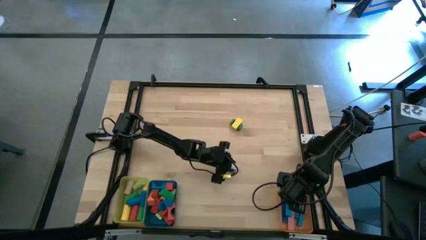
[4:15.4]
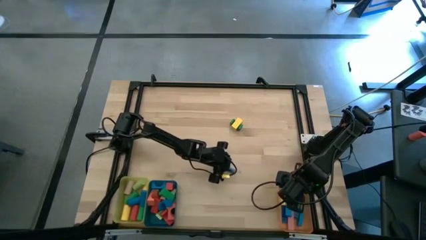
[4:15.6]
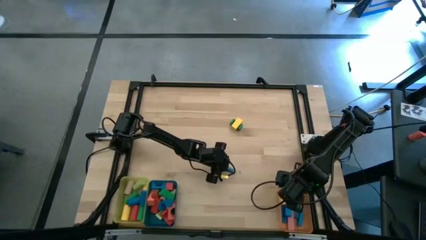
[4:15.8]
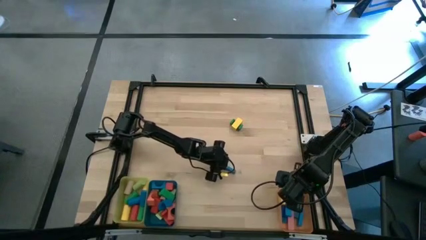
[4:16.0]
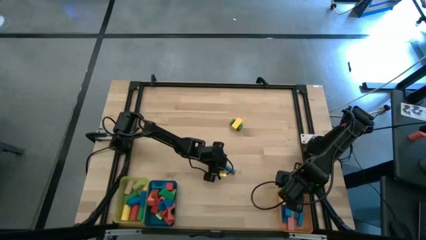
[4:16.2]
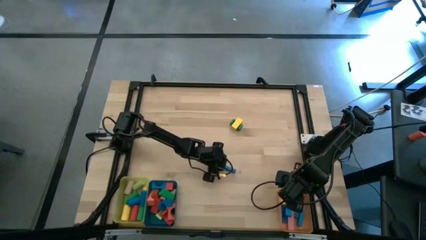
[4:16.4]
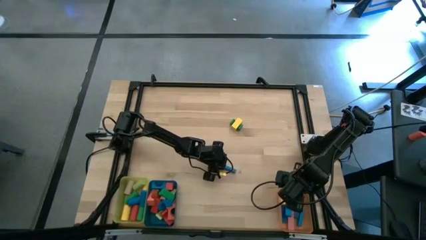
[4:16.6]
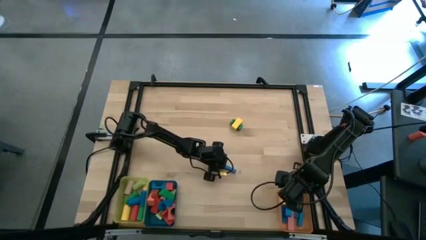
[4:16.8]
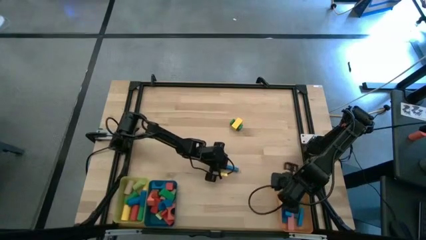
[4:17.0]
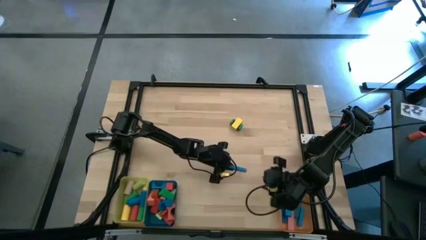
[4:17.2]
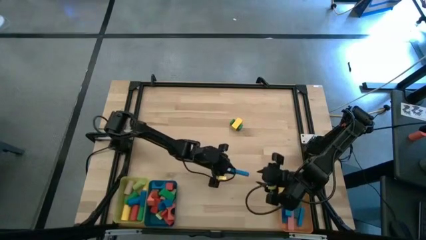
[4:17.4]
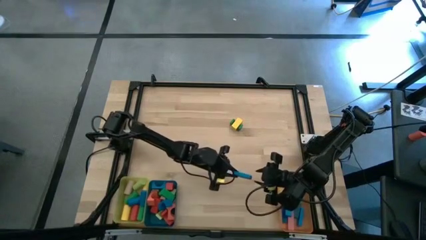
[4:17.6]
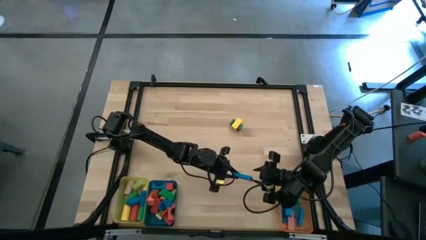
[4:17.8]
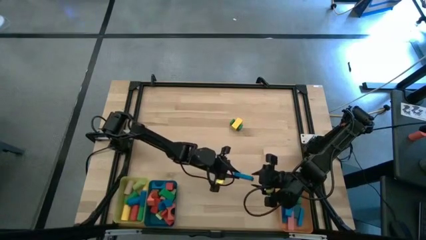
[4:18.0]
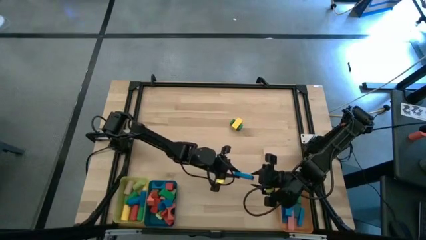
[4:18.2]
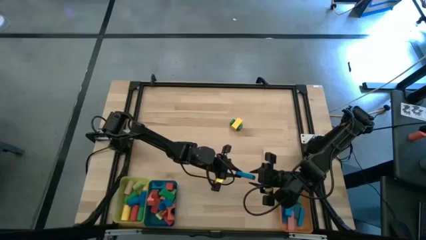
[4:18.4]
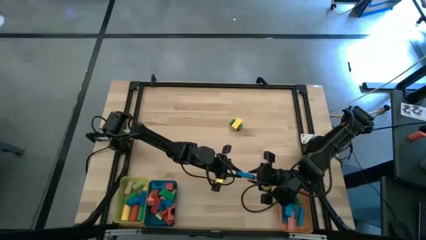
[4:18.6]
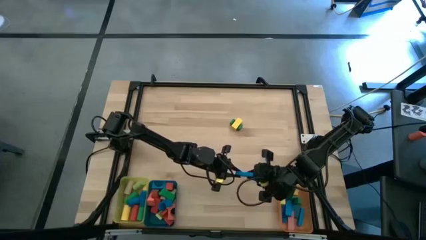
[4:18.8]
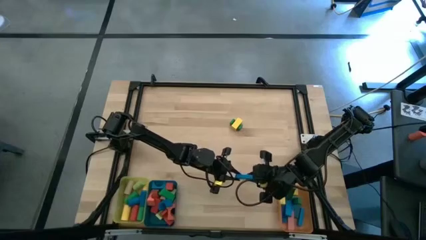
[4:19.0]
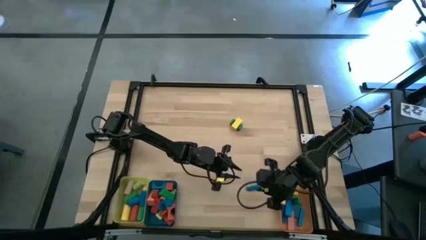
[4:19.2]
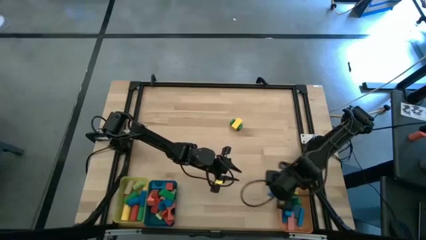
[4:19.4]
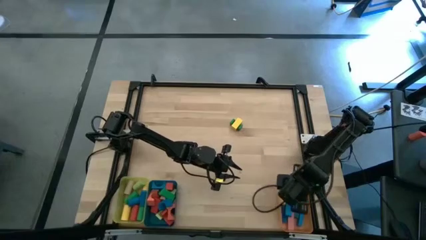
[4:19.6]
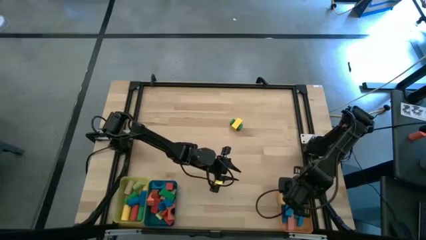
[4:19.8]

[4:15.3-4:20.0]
Task: Sort blocks by size
Put the blue rectangular block into the orange bin

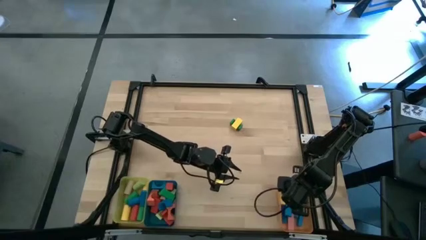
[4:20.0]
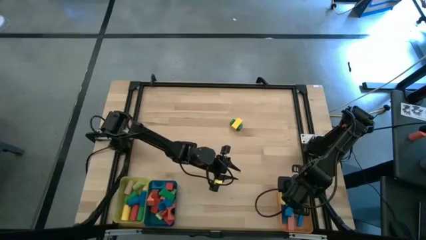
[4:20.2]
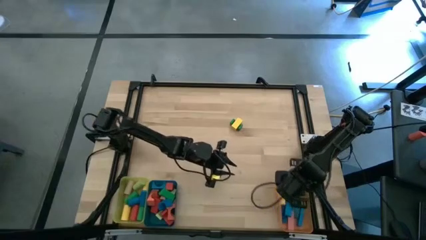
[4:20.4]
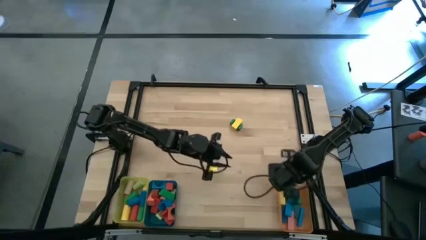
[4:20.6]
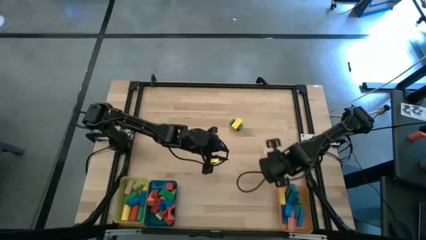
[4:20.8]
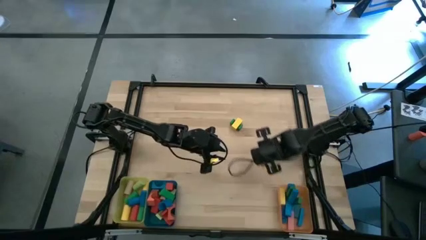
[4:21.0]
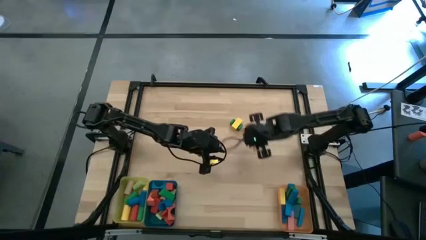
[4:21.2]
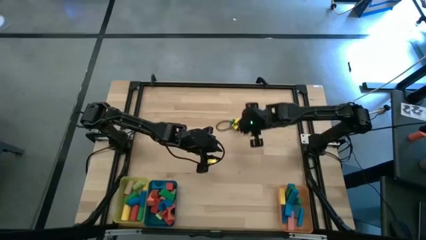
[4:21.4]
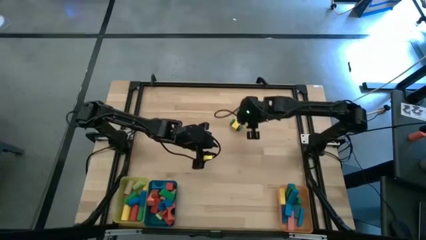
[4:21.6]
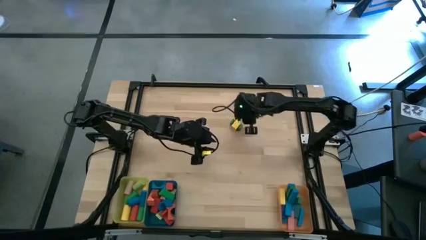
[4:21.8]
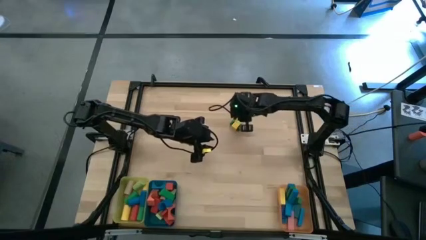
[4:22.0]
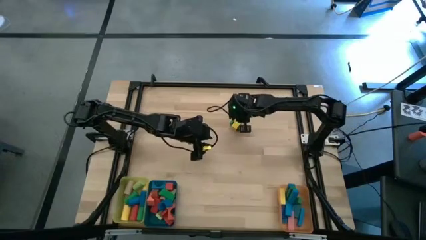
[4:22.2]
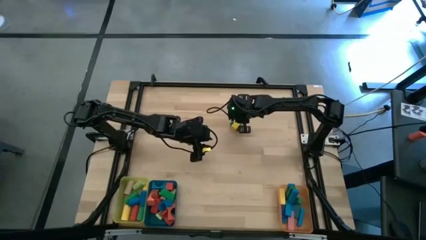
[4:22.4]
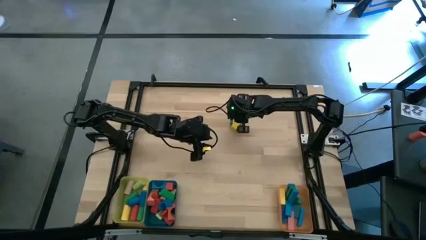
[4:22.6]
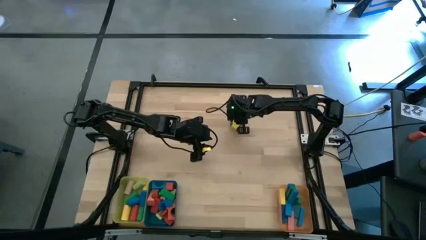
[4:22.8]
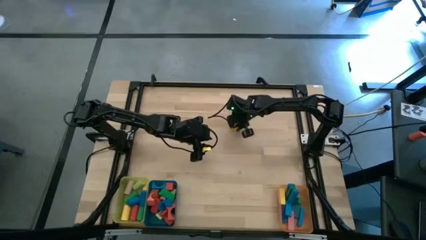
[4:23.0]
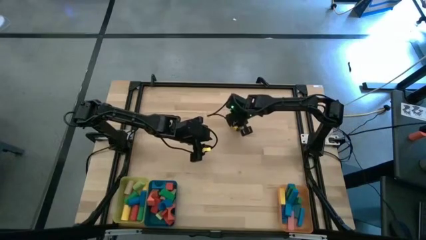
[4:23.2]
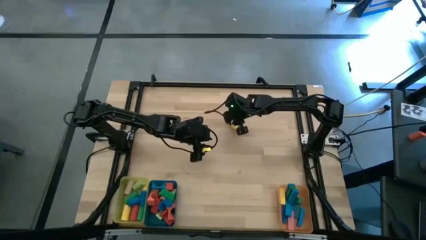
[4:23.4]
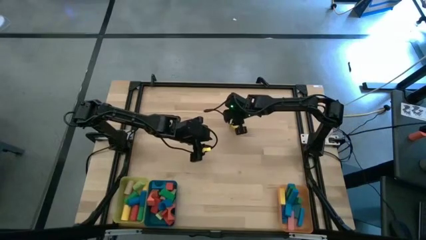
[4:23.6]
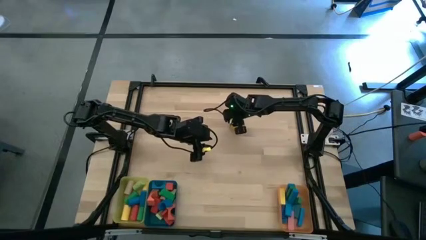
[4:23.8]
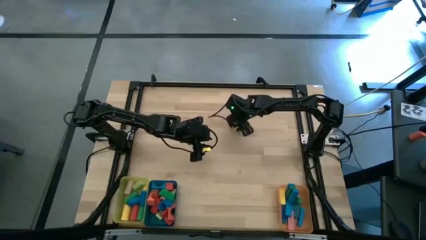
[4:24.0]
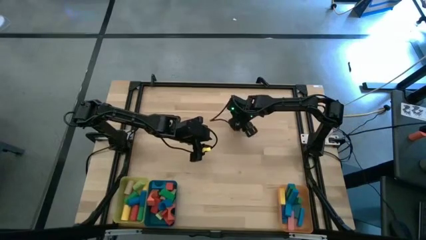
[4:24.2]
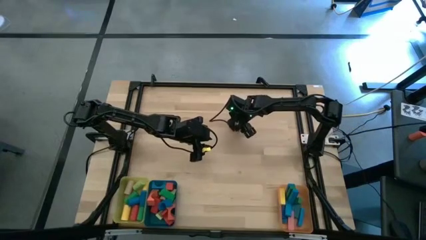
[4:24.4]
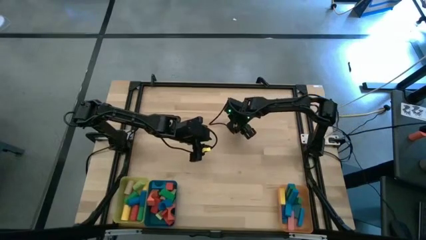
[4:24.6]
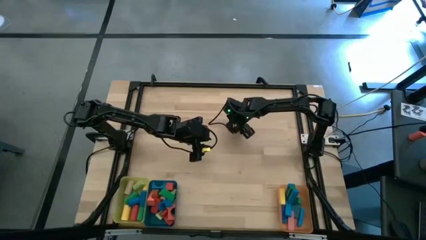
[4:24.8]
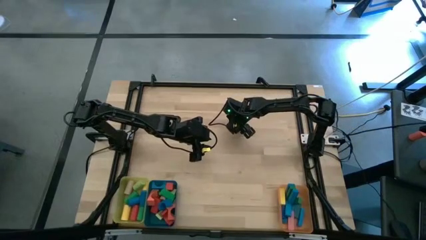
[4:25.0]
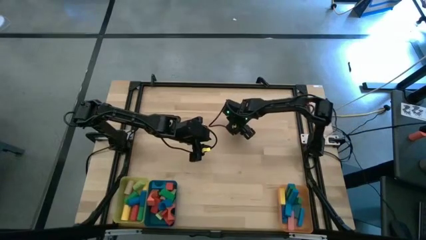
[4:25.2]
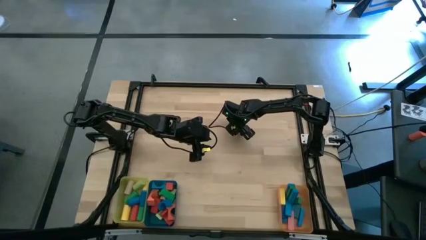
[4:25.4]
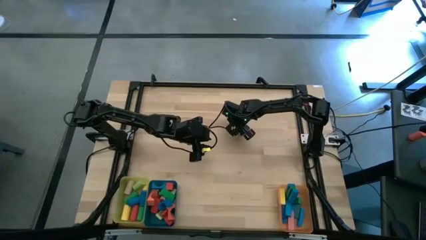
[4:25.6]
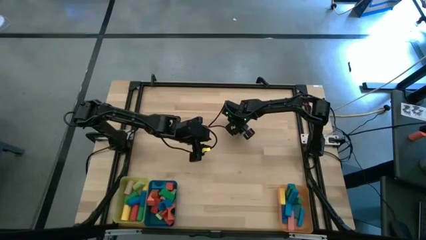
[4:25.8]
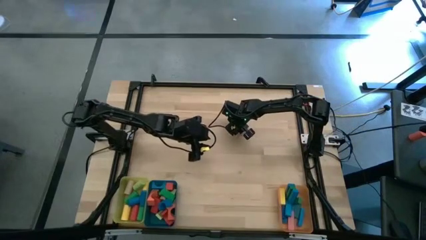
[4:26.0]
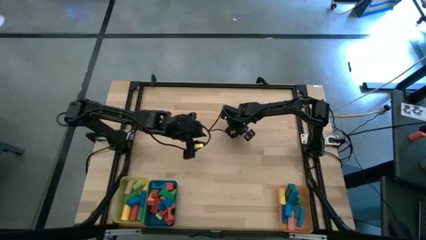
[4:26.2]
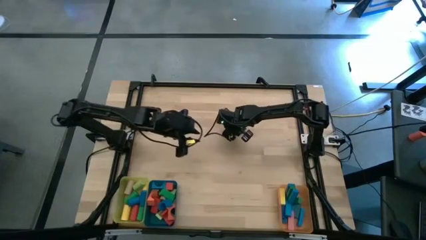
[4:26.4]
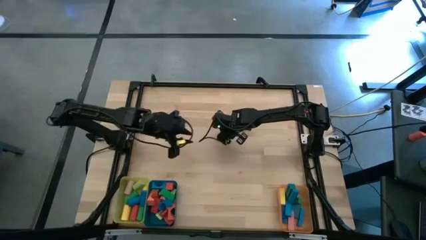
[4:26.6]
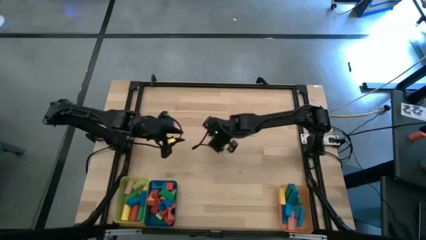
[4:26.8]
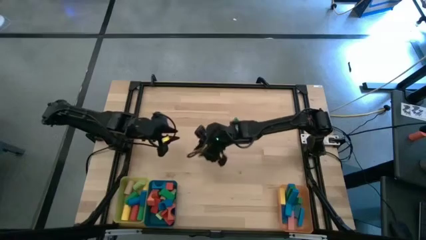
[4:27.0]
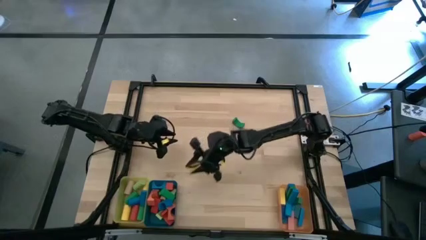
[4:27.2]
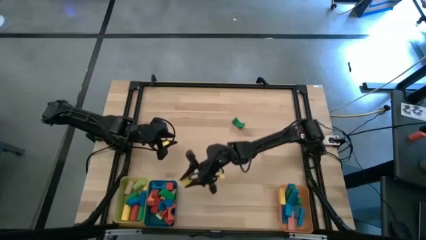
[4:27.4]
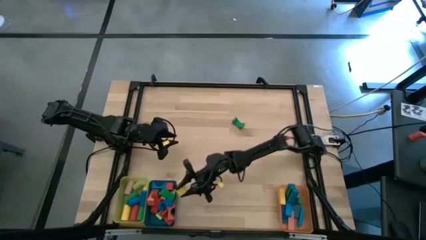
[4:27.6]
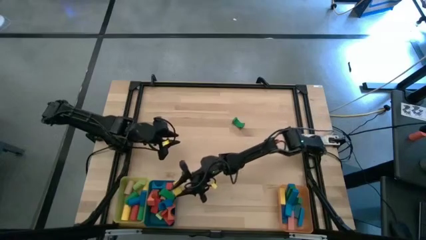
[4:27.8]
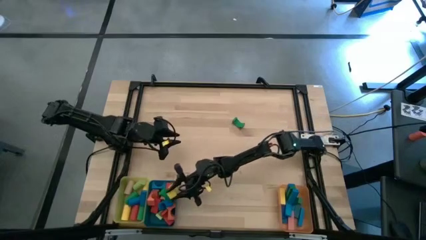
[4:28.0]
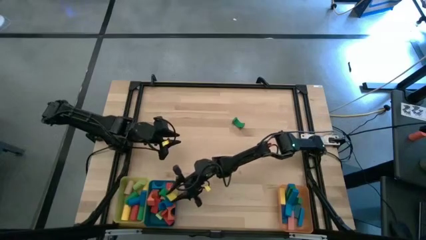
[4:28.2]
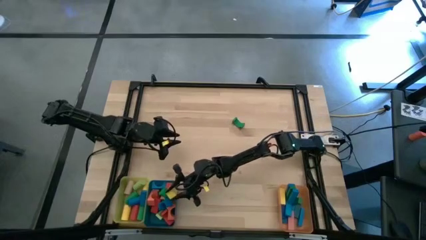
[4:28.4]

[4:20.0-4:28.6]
Put the yellow arch block into the blue bin

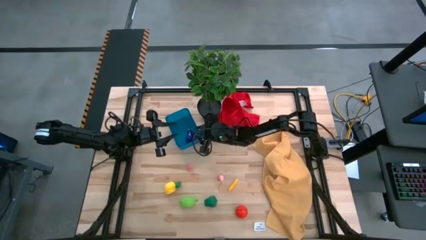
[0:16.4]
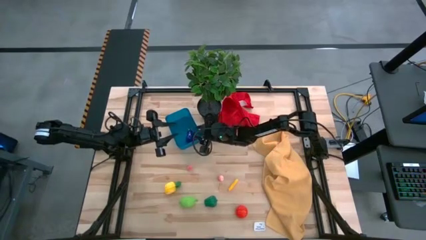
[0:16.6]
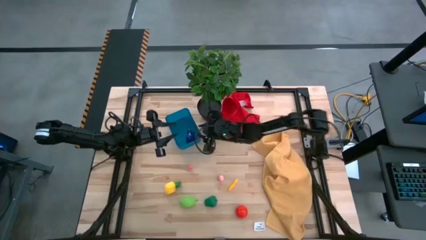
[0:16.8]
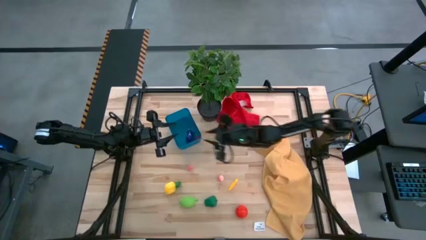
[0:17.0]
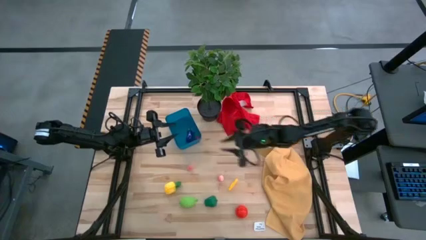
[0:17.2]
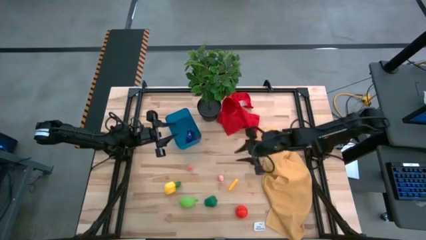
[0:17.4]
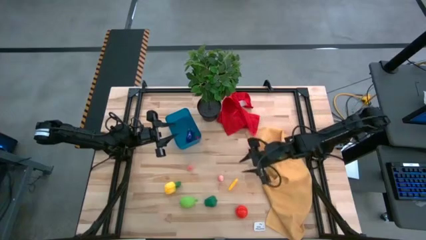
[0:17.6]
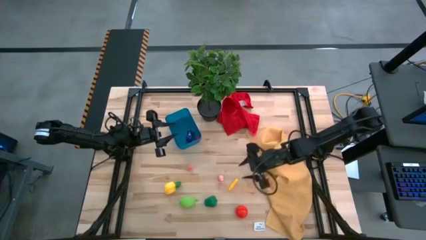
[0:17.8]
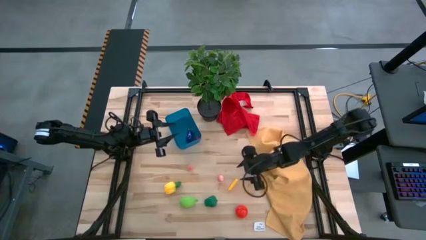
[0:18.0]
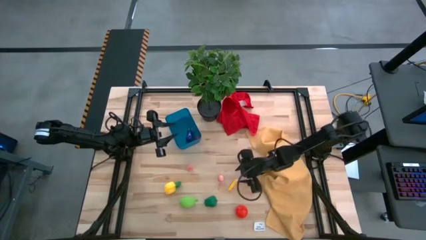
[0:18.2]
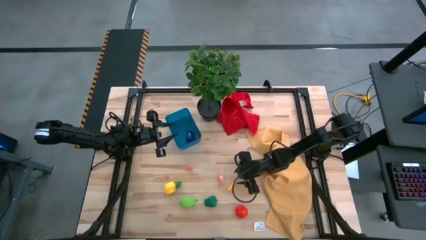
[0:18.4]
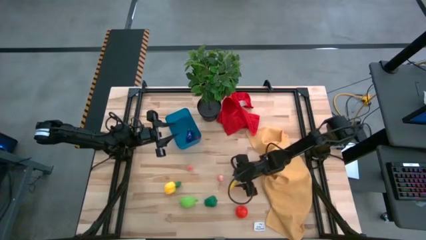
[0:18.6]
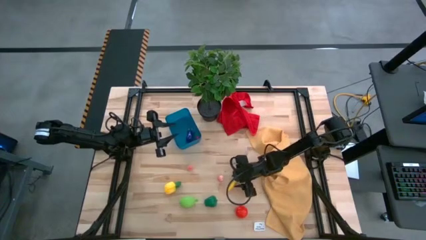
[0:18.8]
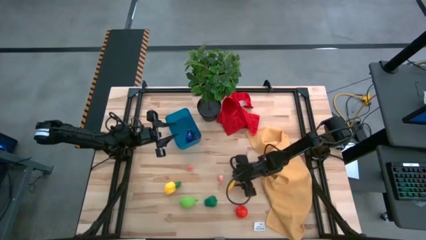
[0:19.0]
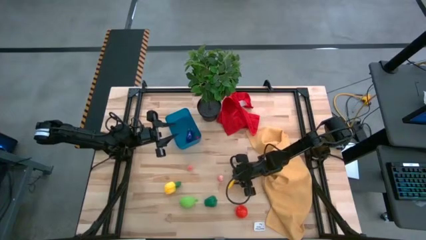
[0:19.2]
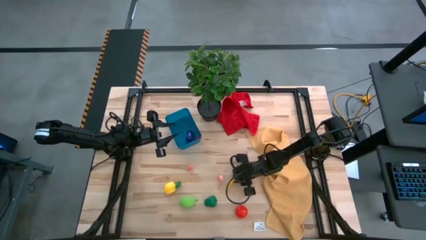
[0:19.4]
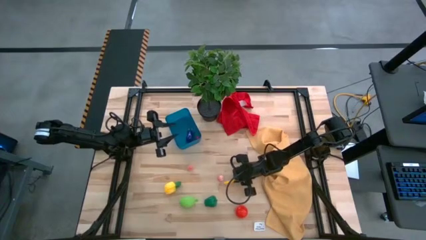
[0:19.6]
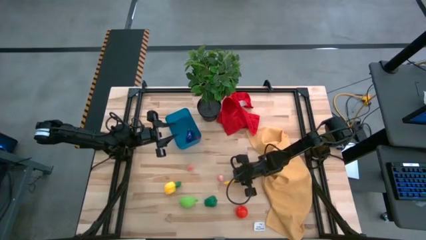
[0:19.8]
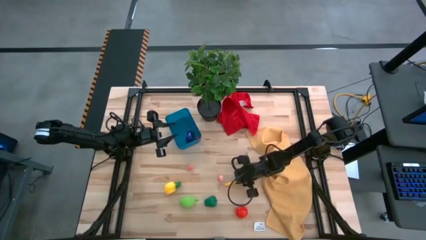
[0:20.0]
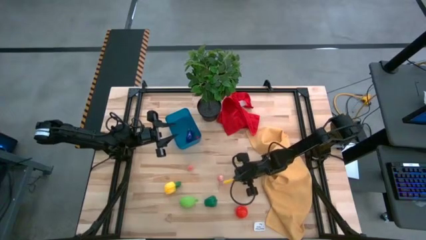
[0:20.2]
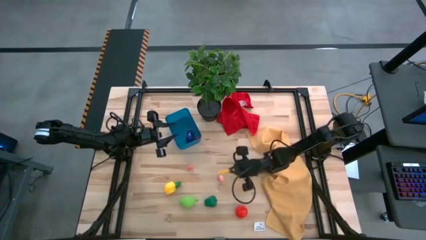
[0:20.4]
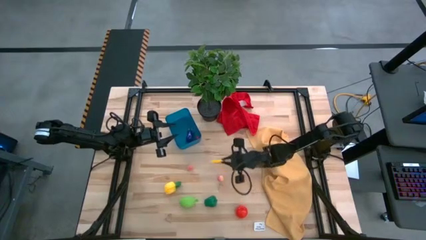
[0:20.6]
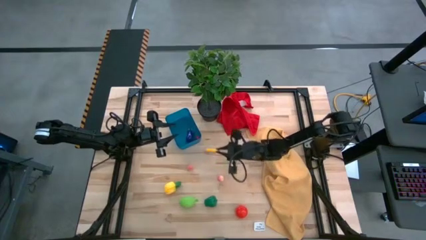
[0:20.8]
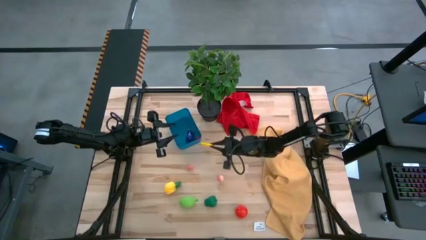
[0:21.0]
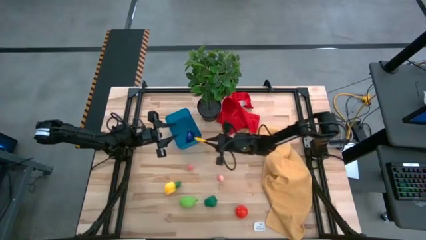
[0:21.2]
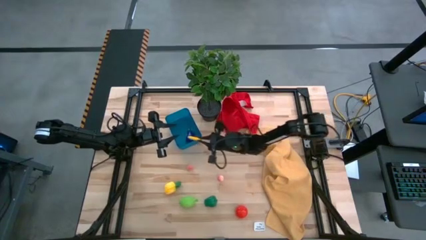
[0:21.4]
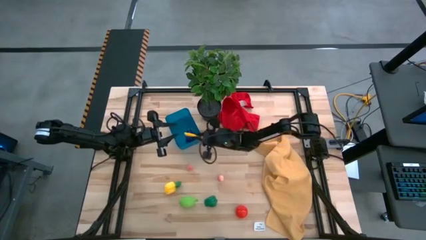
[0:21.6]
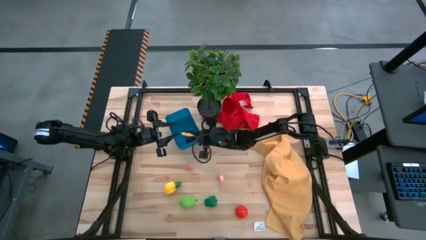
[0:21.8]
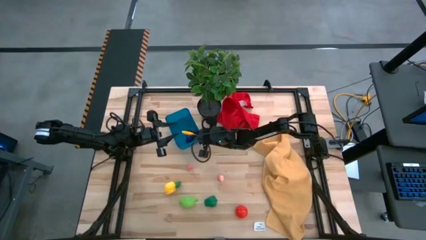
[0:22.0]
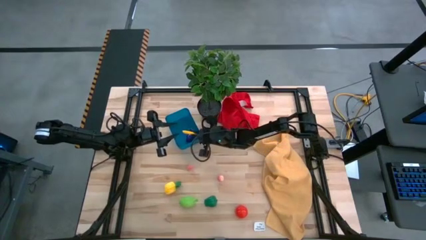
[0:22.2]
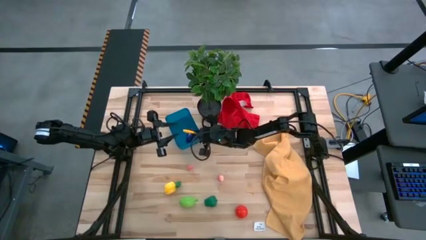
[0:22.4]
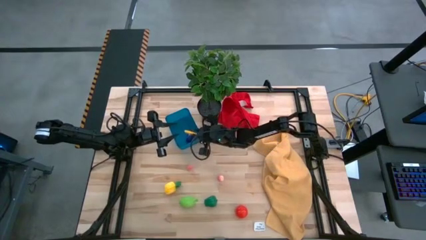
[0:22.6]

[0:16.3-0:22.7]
Task: Pick and placing Produce into tupperware
Put the yellow corn into the blue bin
